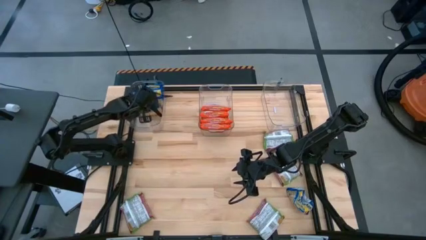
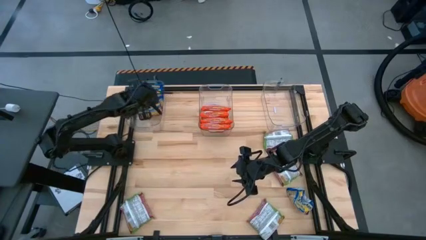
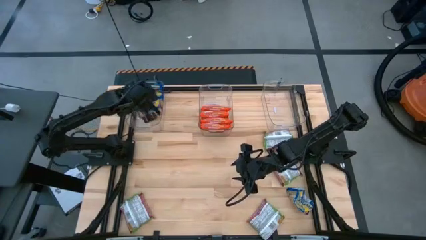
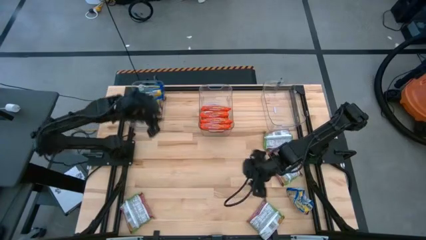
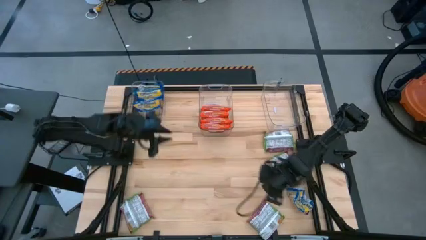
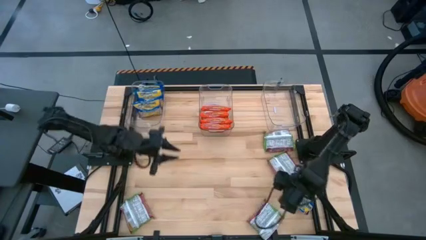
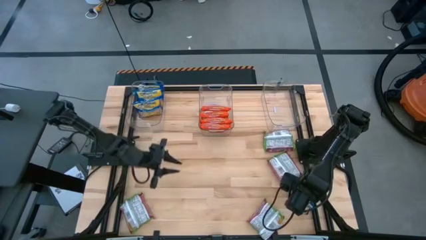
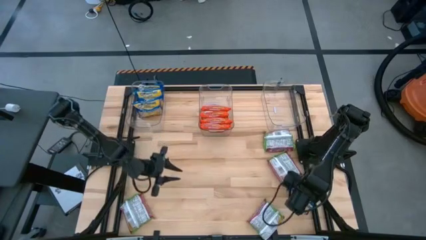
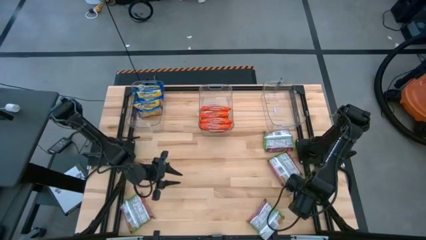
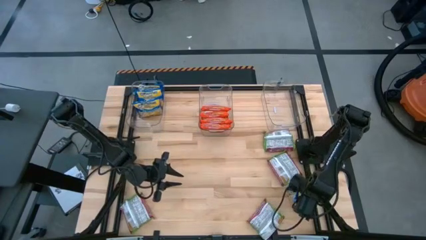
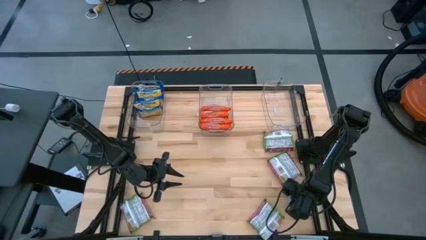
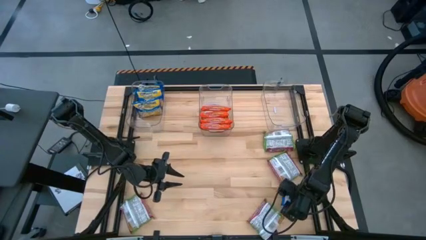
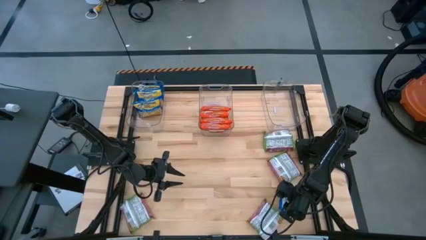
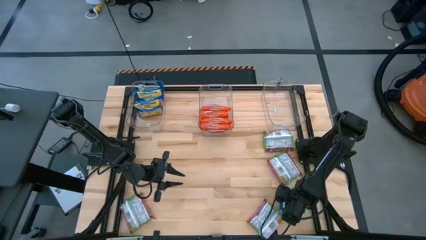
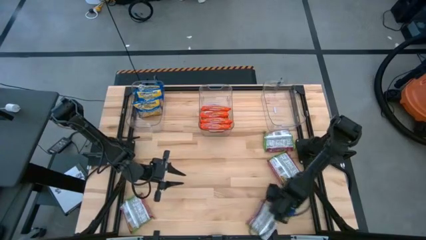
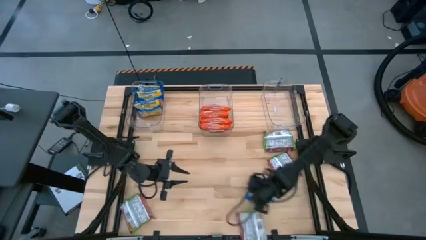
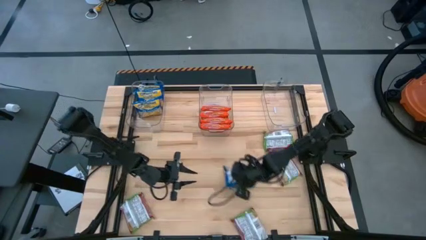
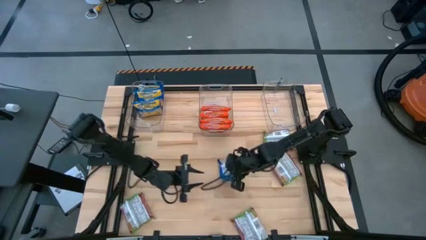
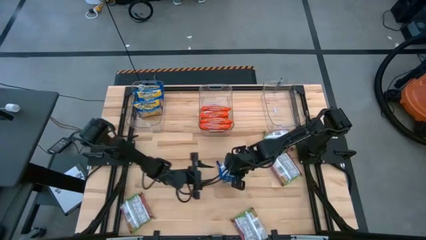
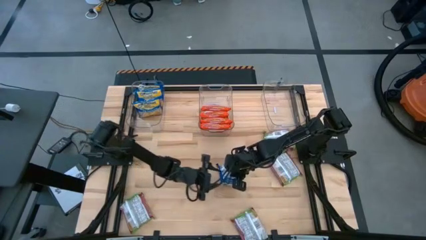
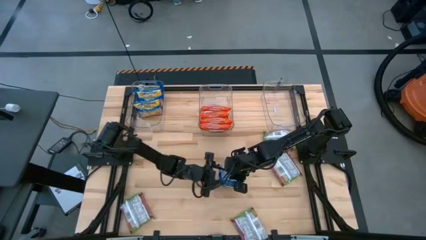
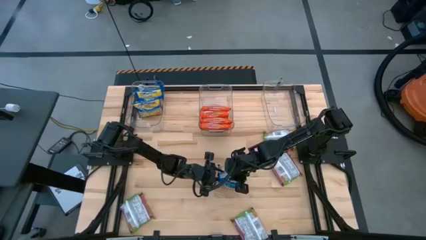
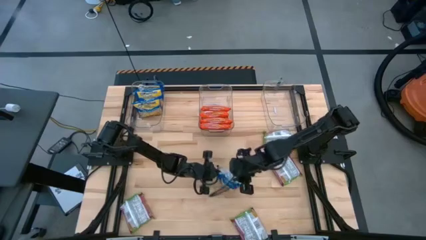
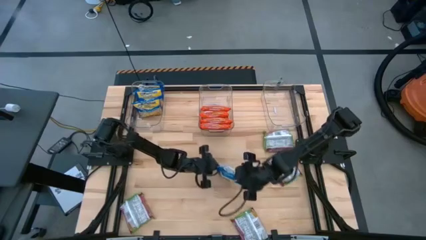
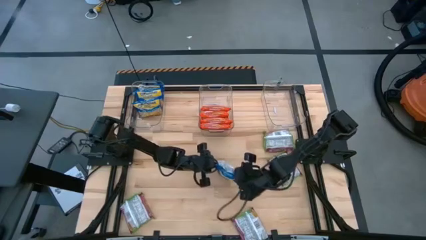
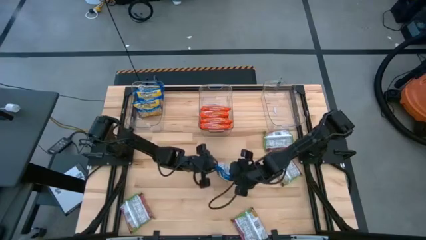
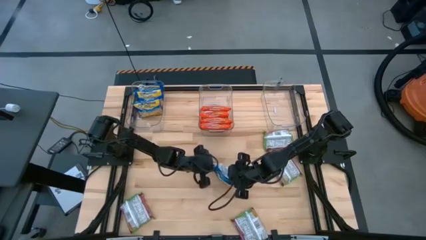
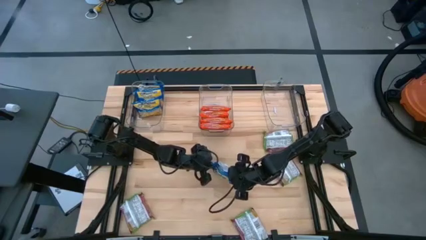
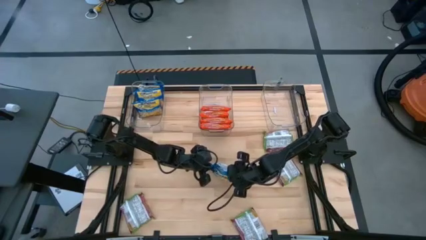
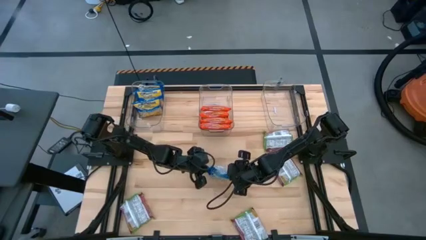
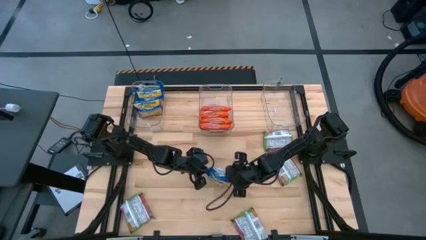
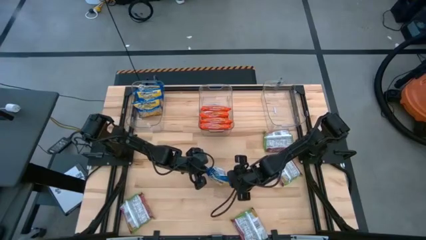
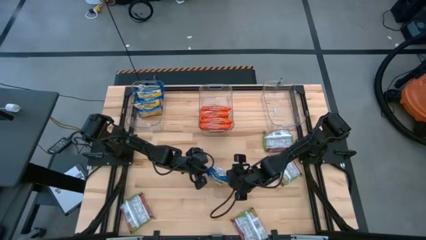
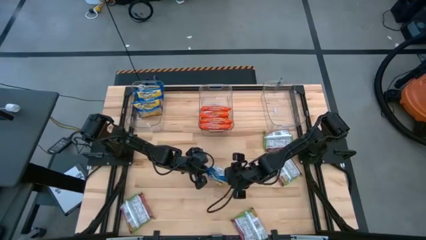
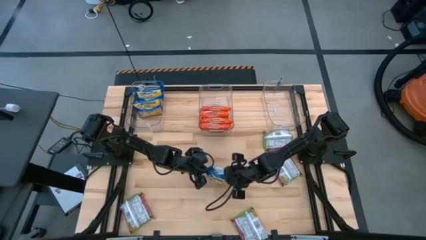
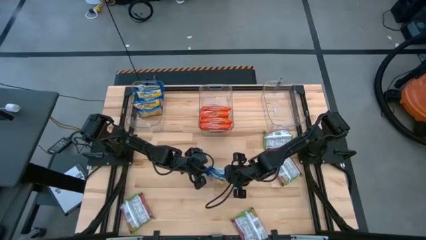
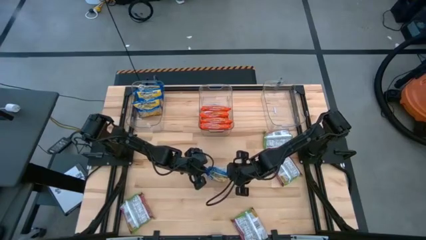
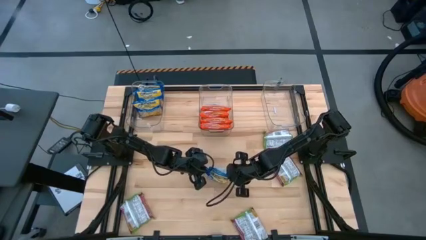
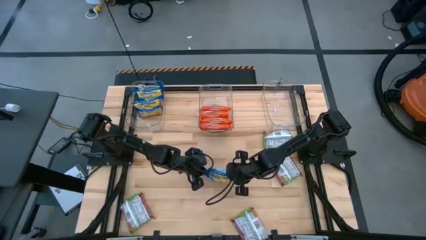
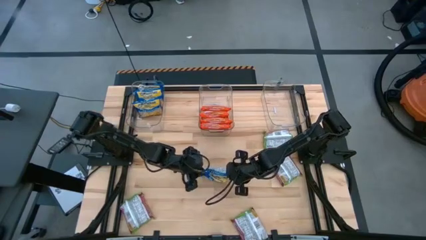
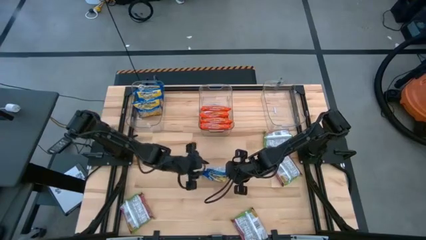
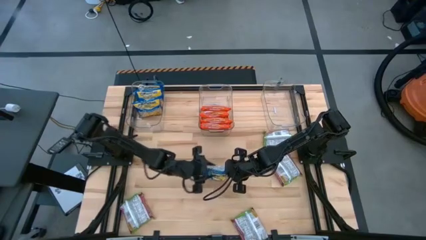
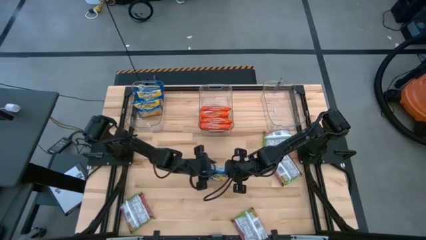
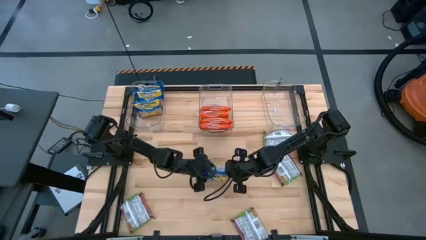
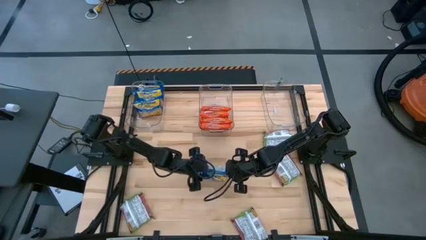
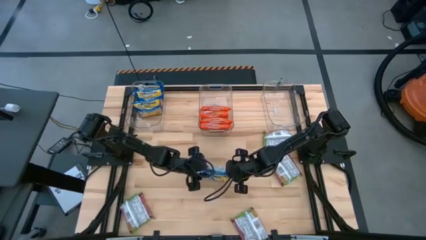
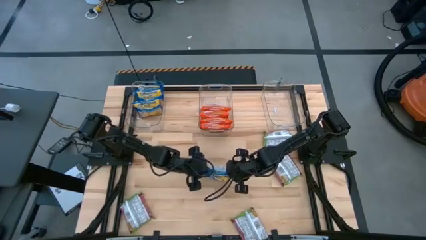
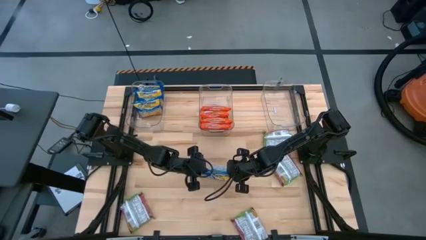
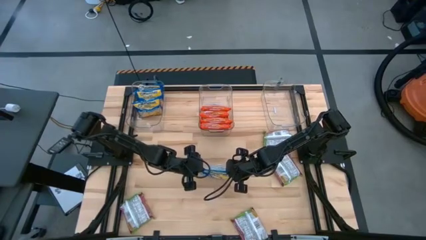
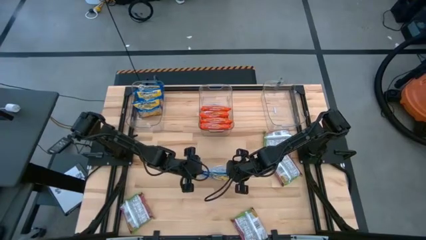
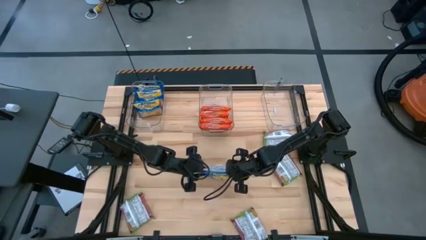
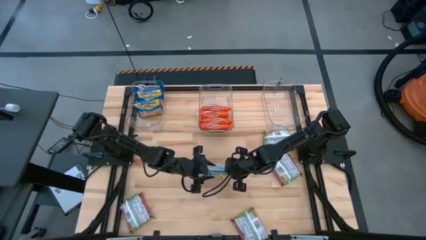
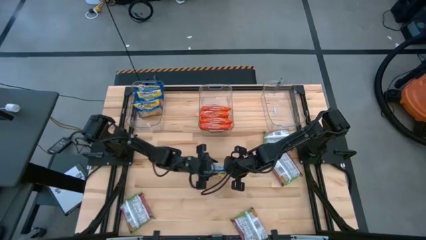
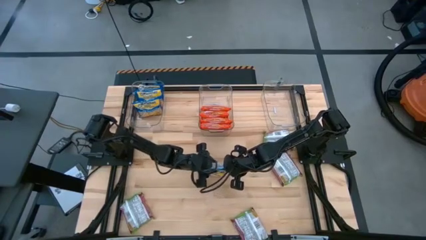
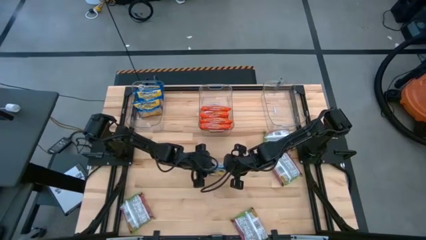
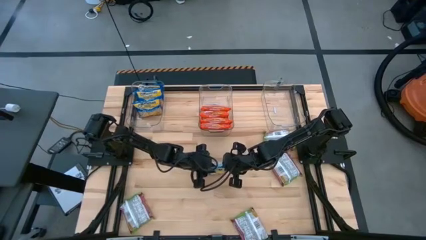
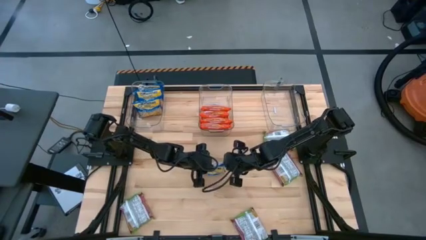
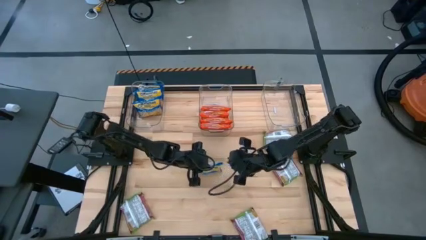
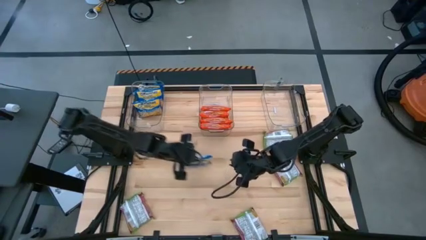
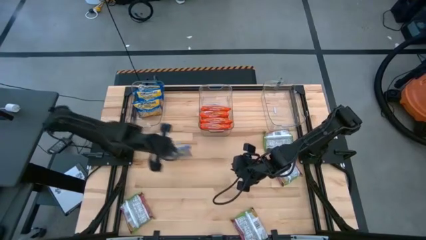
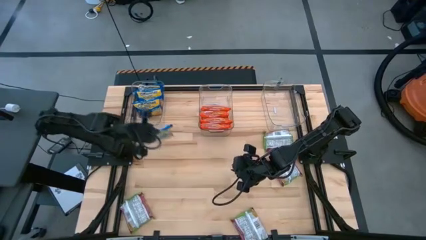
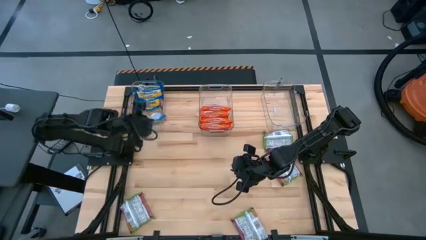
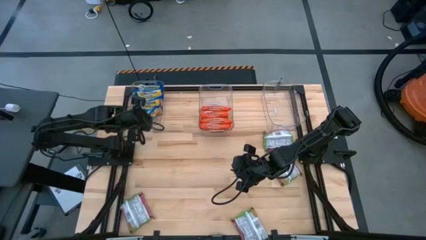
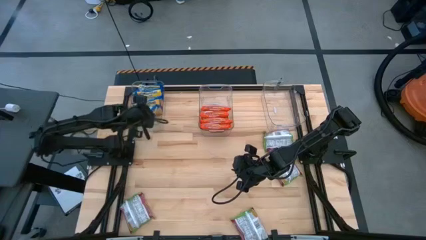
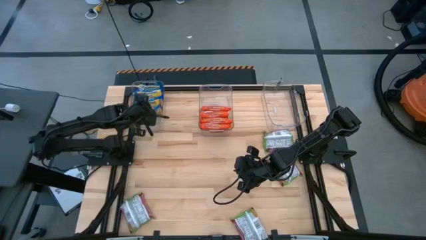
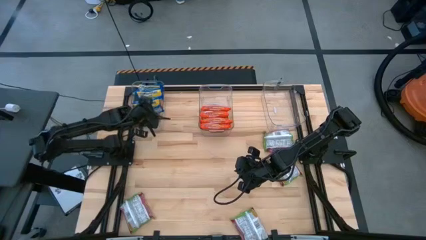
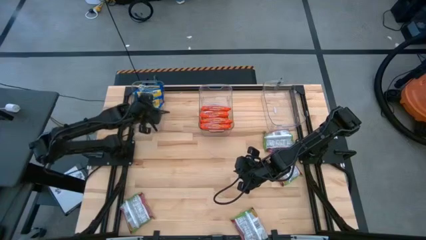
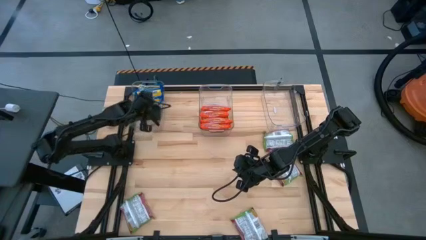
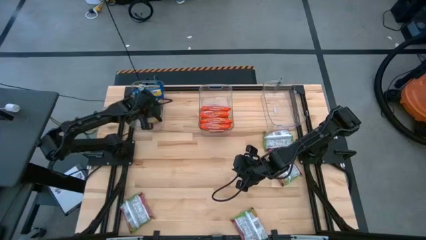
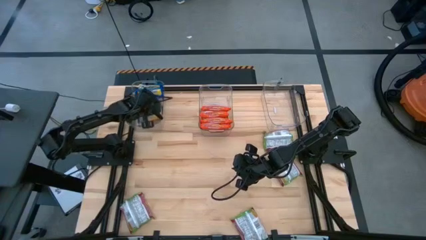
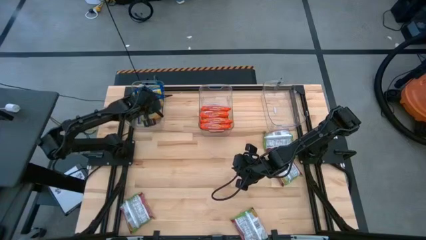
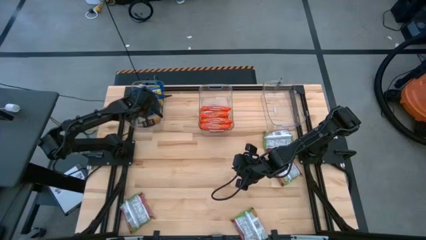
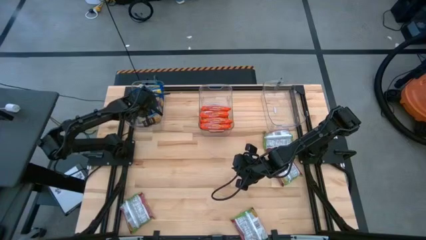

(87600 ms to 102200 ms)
Task: Sort Maruchan noodles
Put the blue noodle pack into the left transparent bin

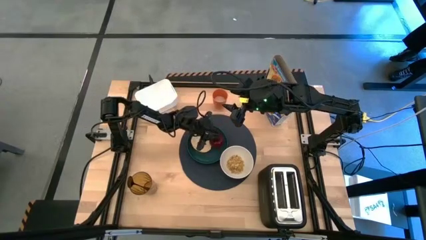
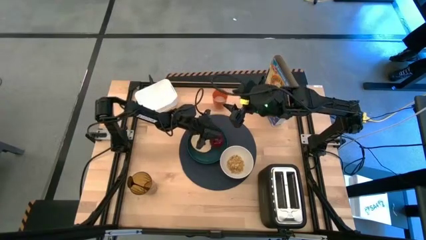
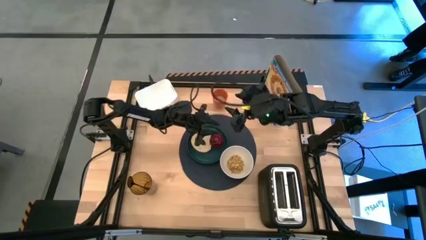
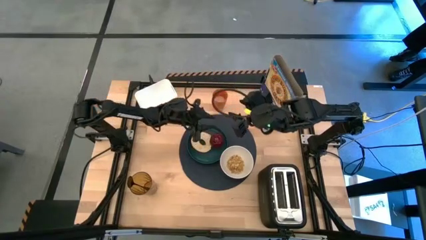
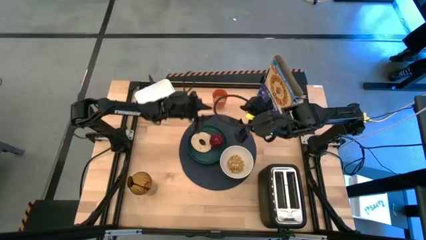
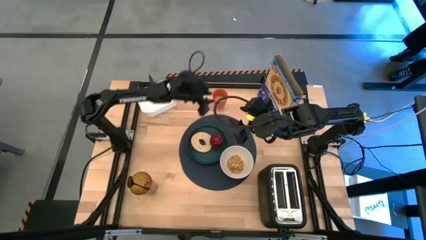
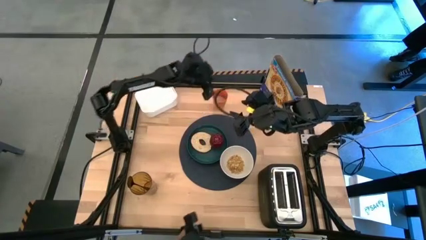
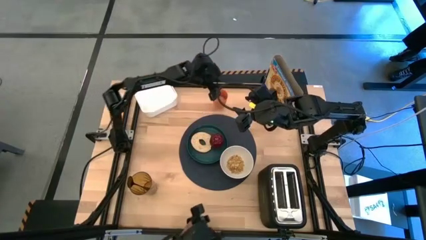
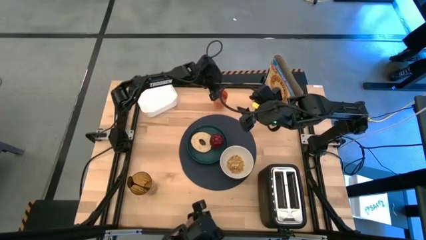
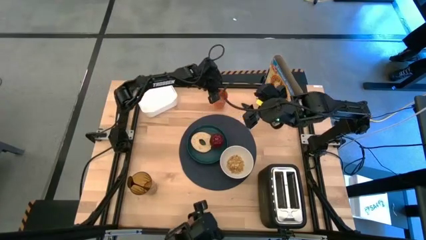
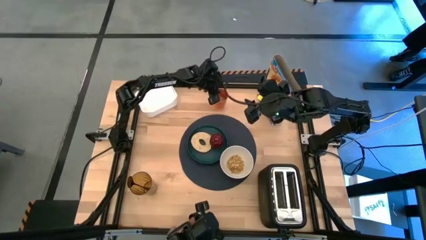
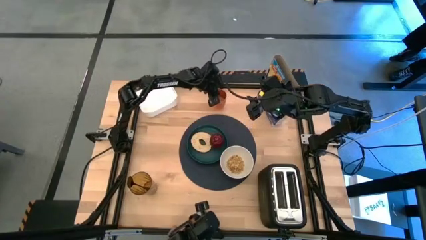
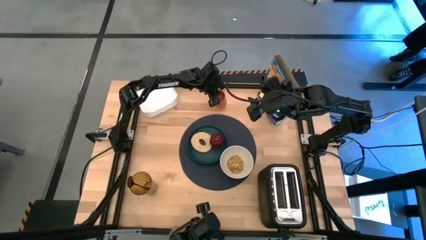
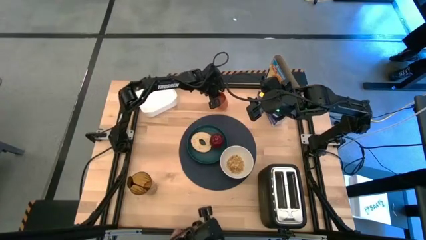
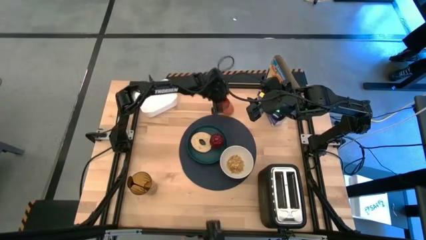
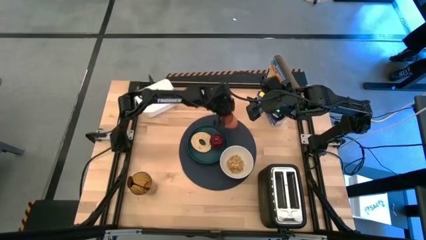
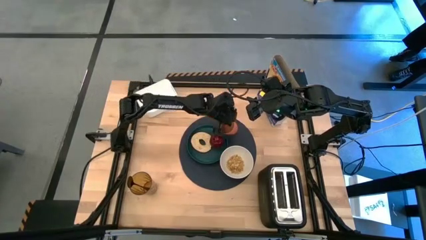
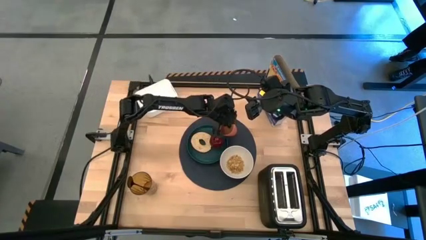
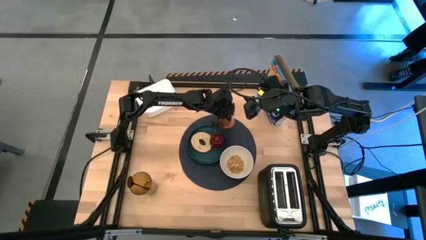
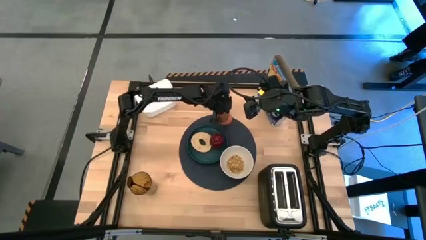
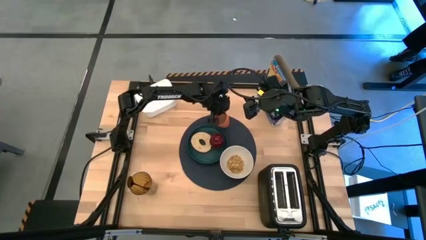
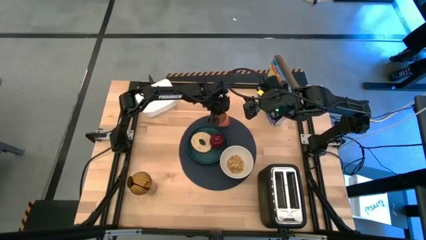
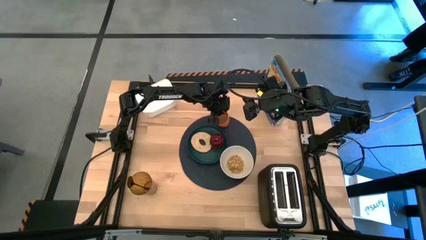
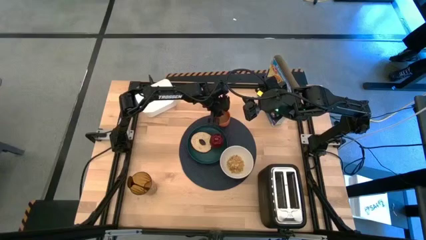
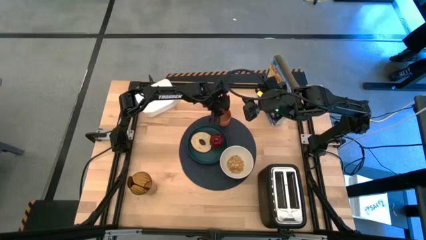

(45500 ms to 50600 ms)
Task: Arrange a breakfast setting
Put the orange cup to the top of the green plate on the black table mat
